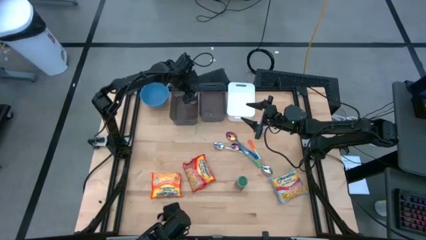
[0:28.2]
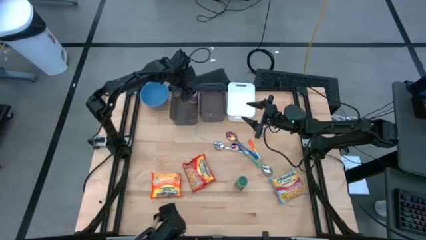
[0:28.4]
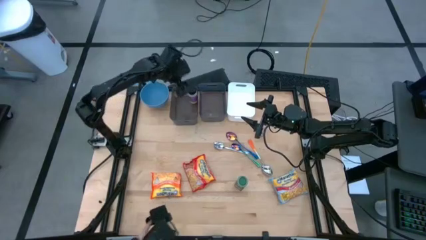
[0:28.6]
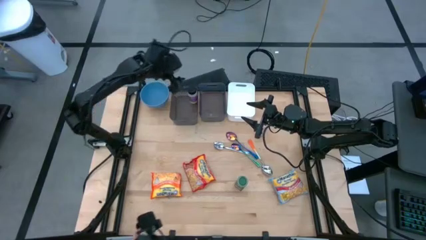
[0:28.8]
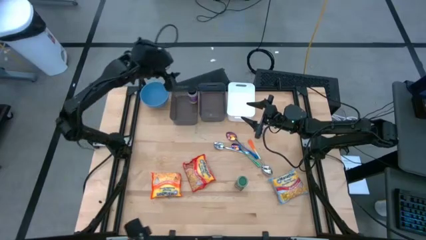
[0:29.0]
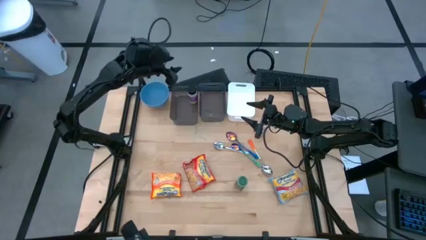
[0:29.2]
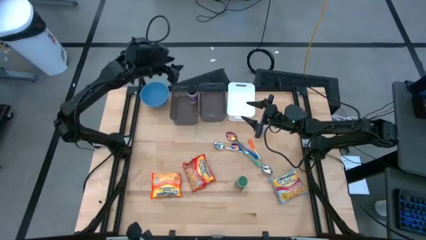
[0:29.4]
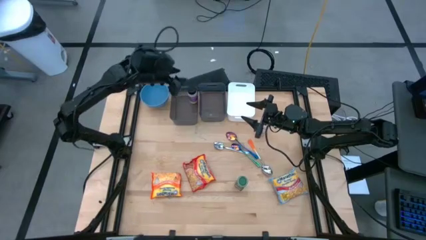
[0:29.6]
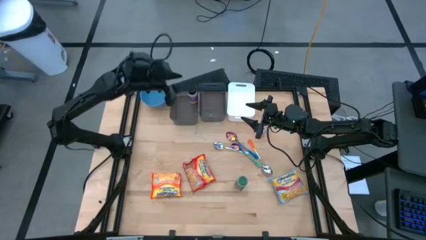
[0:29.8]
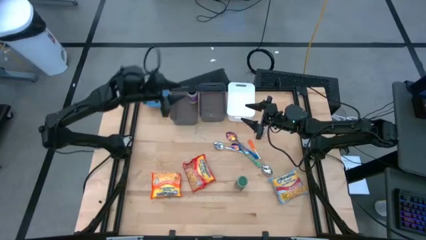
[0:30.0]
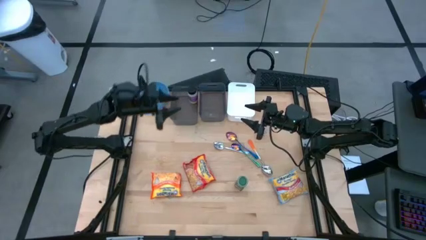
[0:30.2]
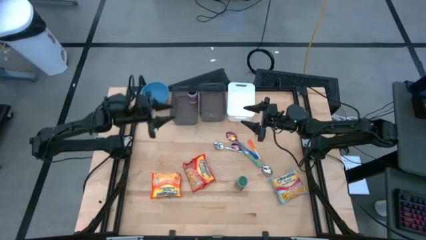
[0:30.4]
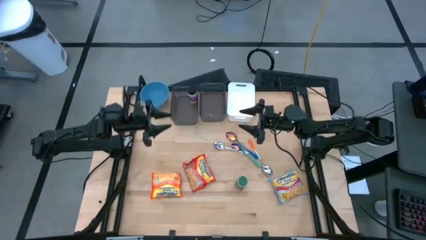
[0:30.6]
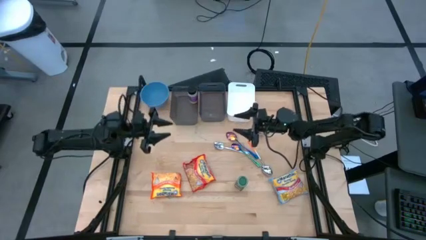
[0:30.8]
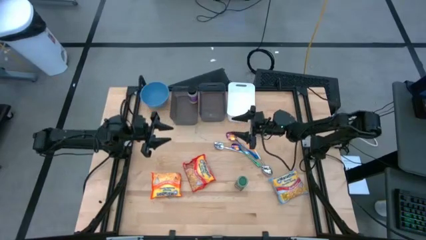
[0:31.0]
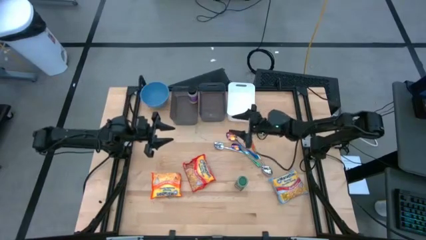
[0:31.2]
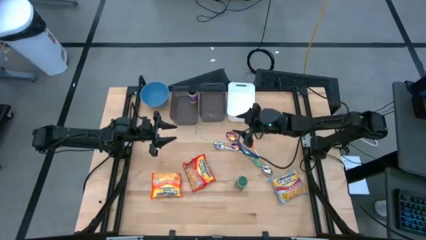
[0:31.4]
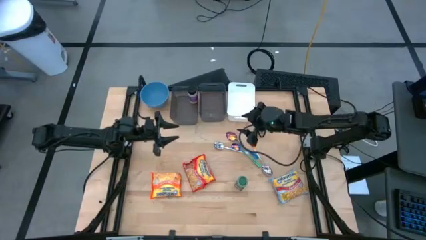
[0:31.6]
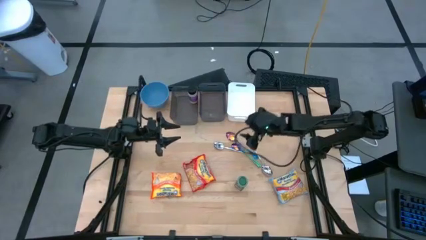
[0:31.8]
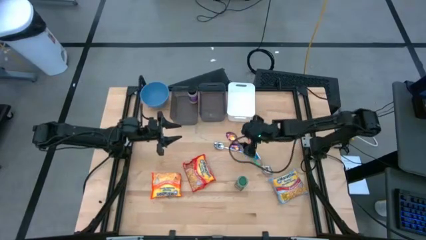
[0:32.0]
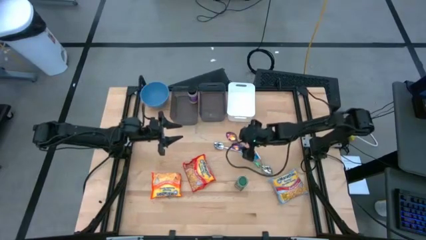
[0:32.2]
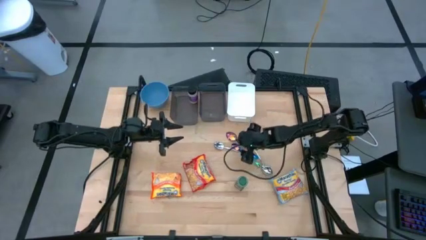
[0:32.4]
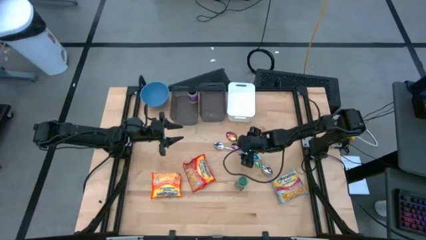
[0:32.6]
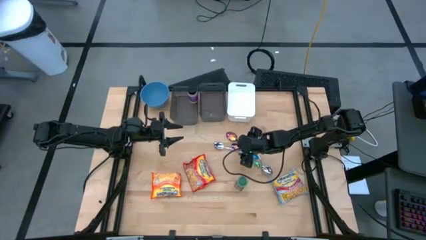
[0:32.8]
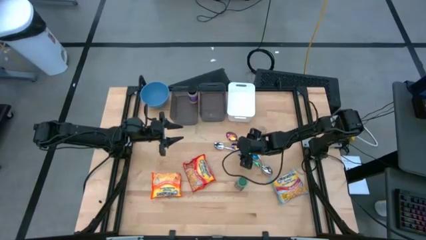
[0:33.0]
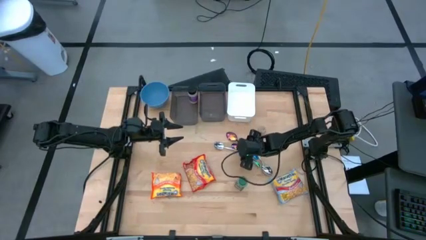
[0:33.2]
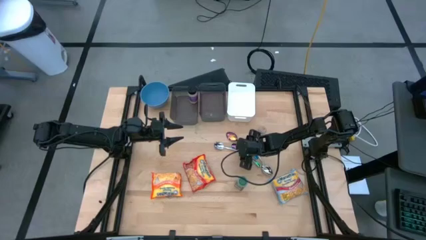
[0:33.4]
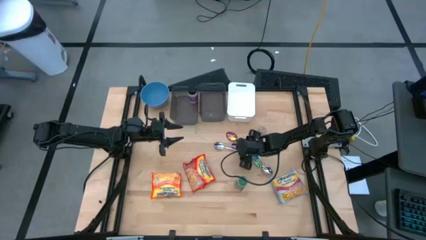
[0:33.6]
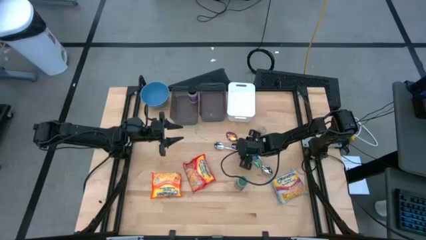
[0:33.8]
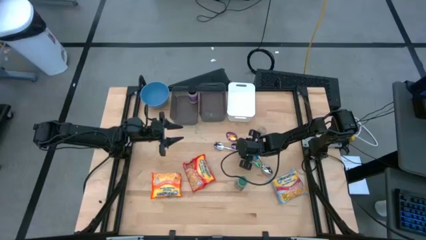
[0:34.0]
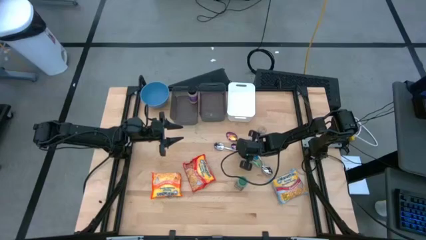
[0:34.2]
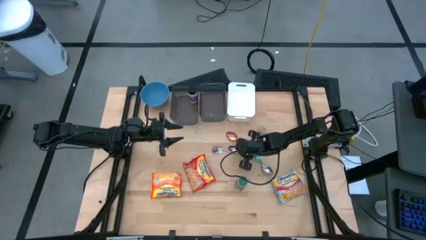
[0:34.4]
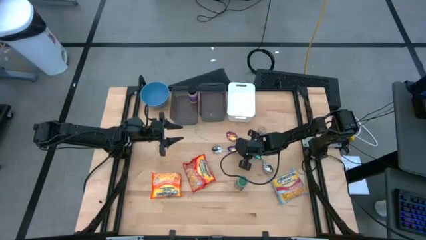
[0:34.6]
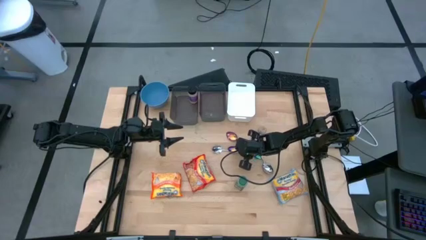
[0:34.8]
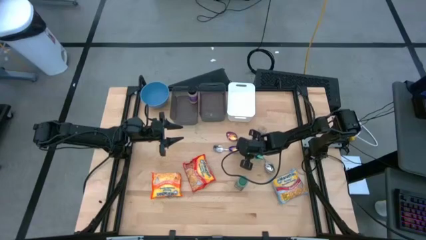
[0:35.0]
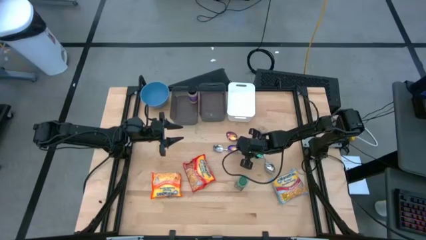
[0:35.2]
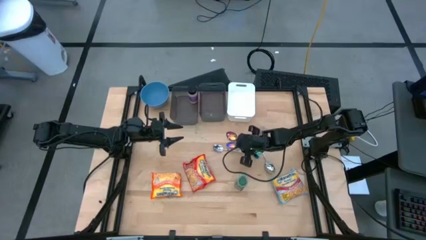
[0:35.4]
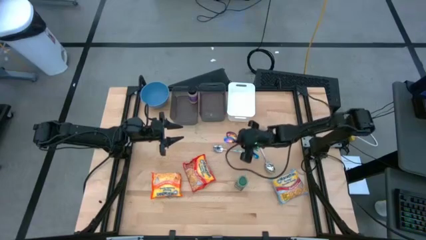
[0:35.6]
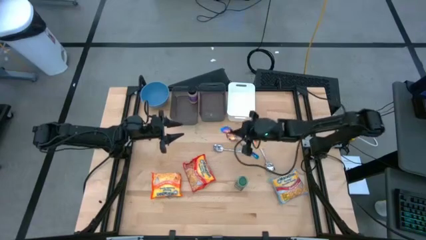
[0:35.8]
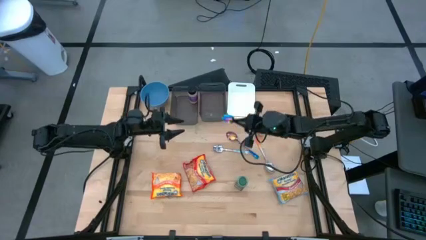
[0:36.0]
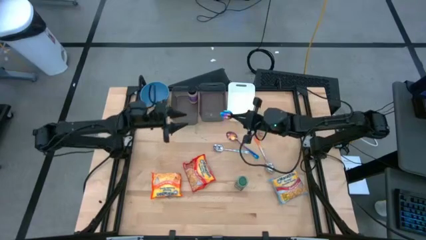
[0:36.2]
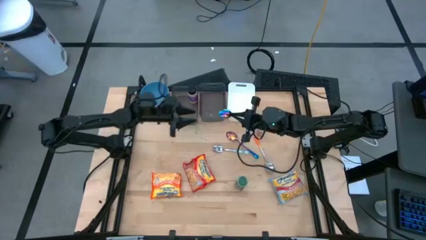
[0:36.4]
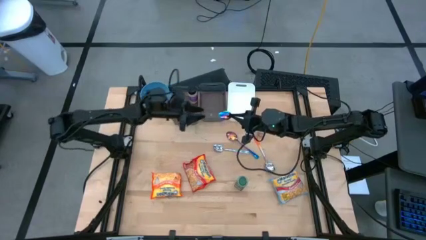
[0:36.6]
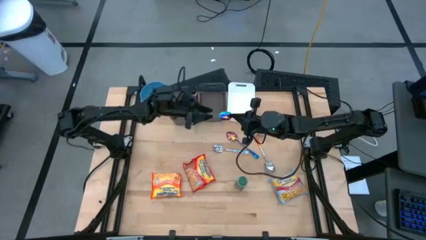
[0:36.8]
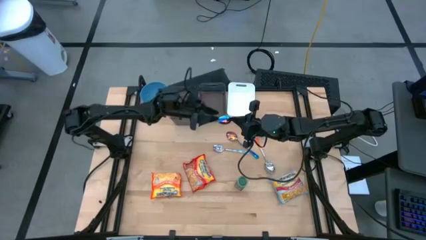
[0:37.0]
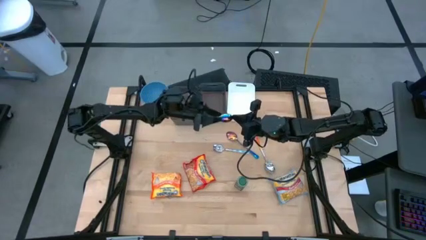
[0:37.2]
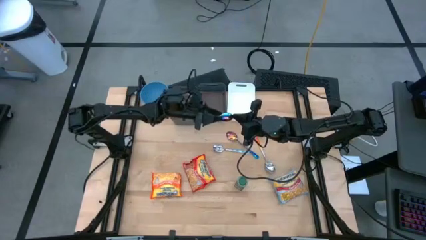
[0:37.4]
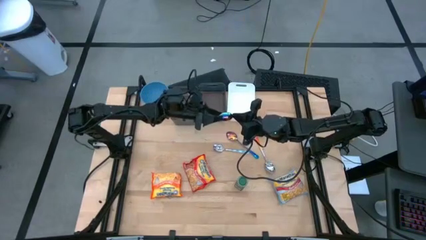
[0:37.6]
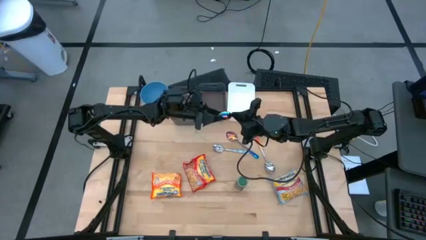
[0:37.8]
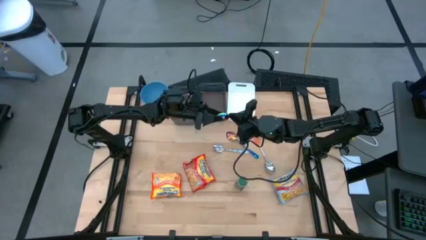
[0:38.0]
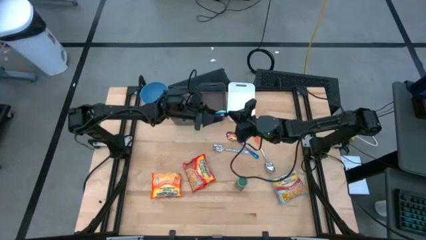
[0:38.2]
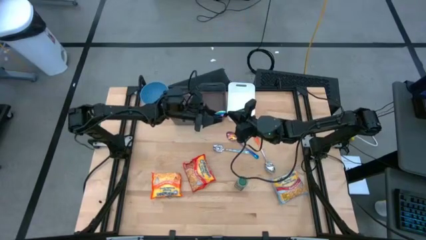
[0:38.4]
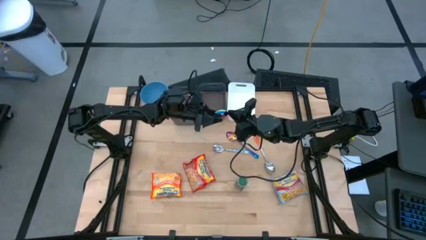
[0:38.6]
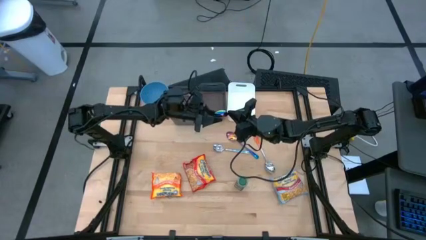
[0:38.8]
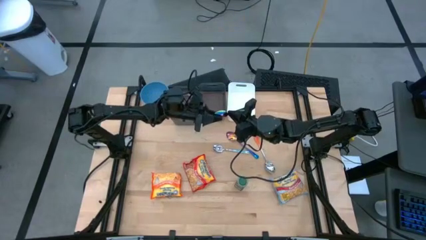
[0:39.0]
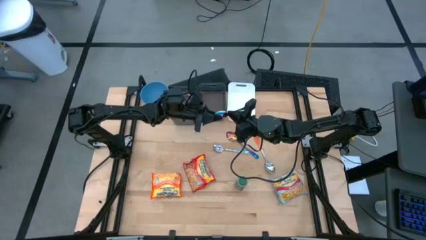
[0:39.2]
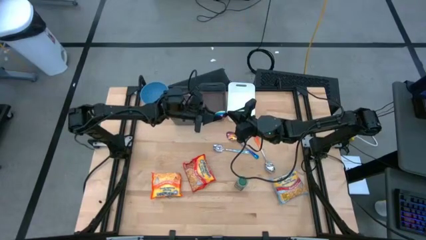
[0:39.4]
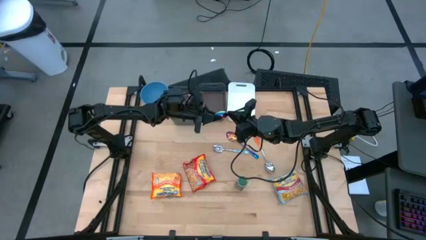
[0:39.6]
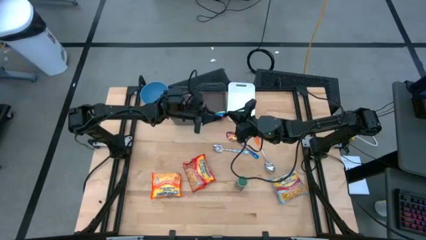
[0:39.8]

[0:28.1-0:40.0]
Task: Pick & Place Food Item
Put the blue spoon into the right black bin

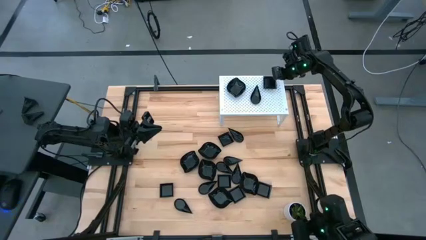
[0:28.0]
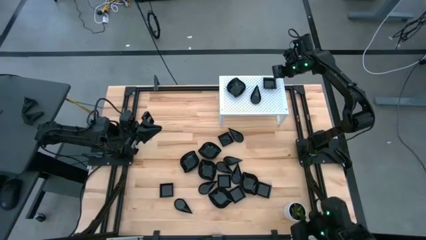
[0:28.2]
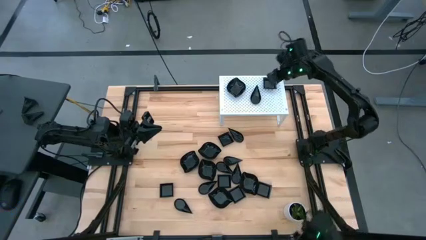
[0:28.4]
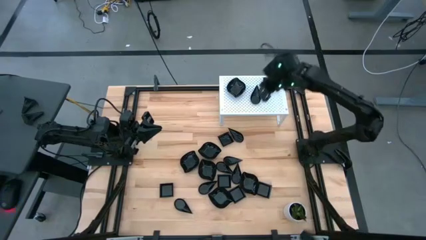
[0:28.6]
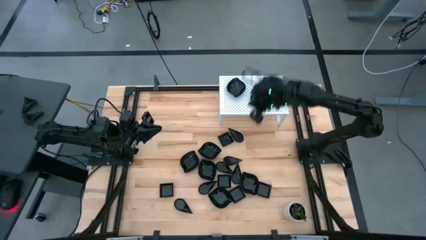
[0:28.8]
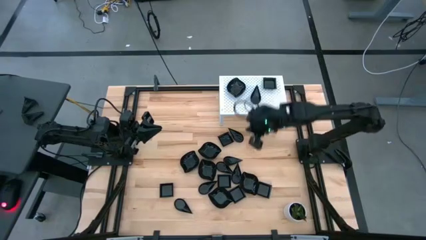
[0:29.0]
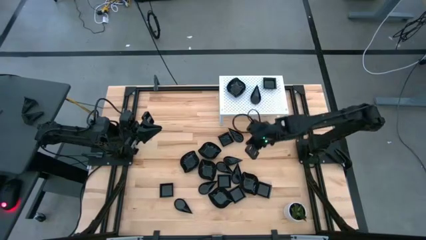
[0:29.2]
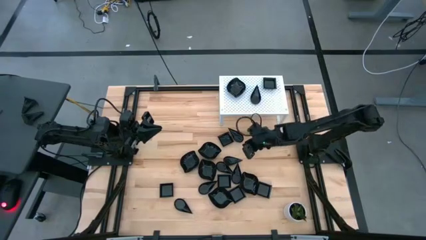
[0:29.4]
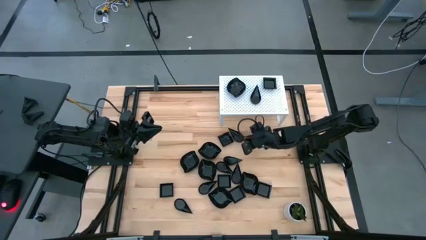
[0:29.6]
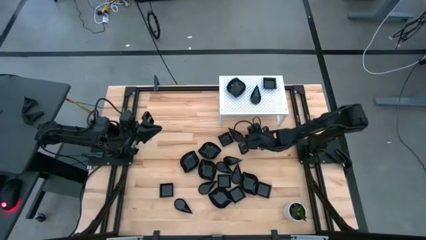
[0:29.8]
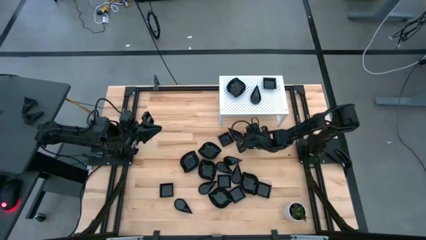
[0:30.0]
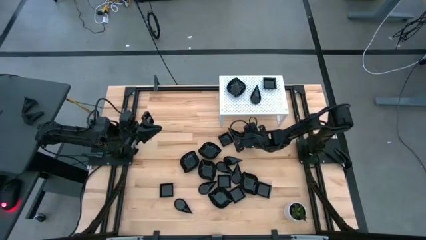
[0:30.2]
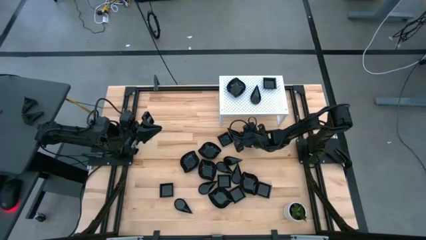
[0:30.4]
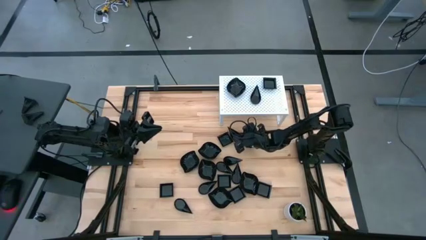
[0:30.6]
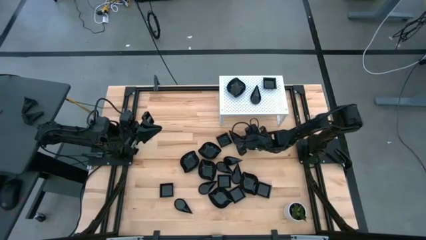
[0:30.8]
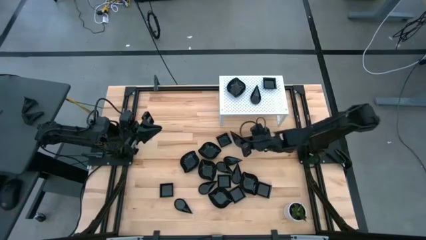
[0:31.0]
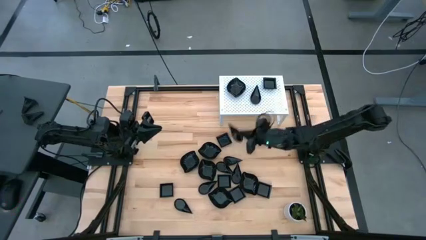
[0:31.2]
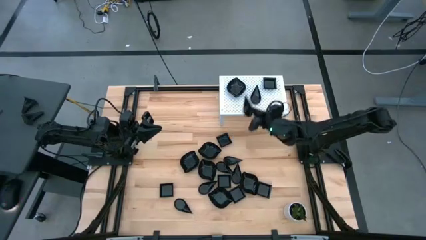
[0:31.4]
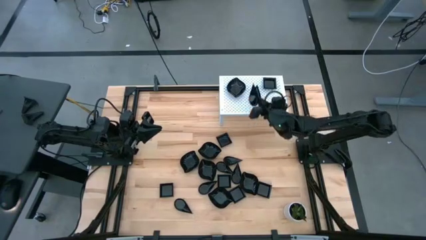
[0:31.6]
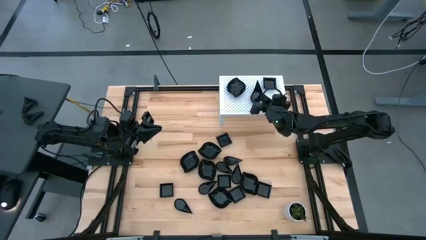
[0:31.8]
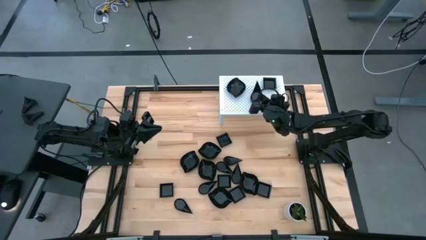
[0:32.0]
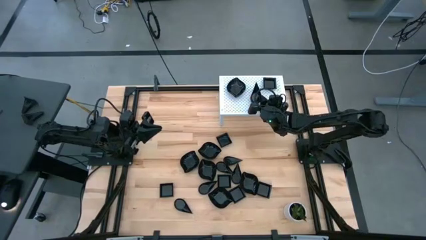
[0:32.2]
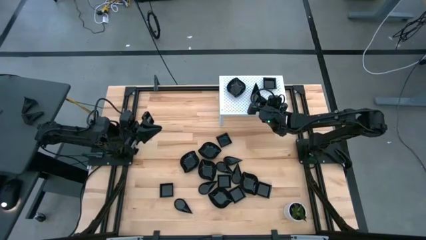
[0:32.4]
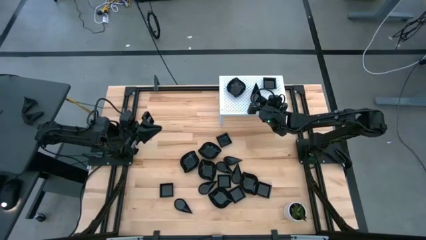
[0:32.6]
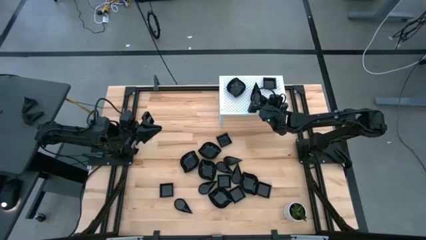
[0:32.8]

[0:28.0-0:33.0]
Task: Pick & Place Mini shaped plates
Stack the drop shaped plate on top of the drop shaped plate on the shelf
